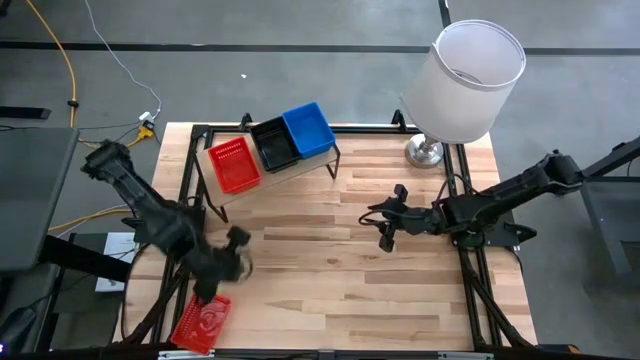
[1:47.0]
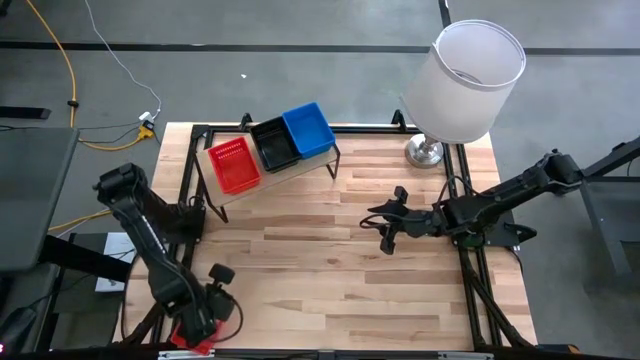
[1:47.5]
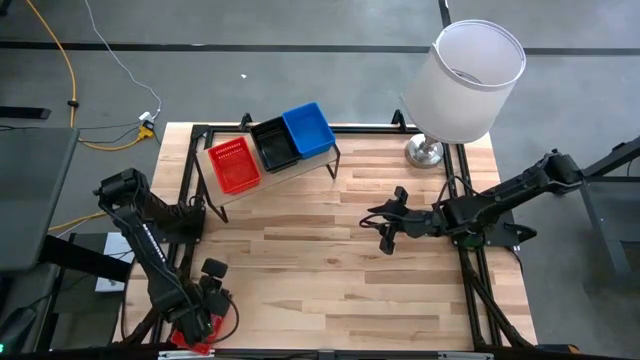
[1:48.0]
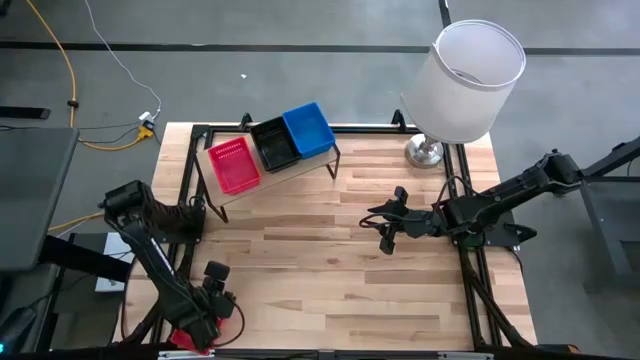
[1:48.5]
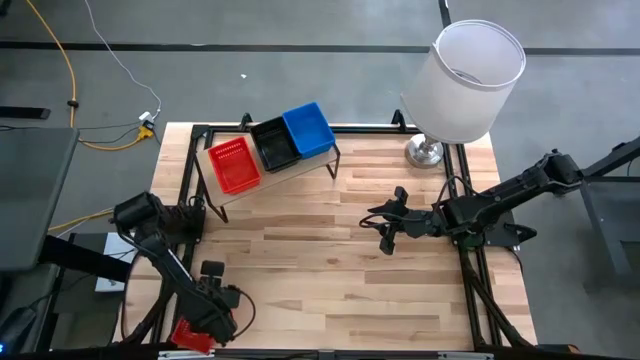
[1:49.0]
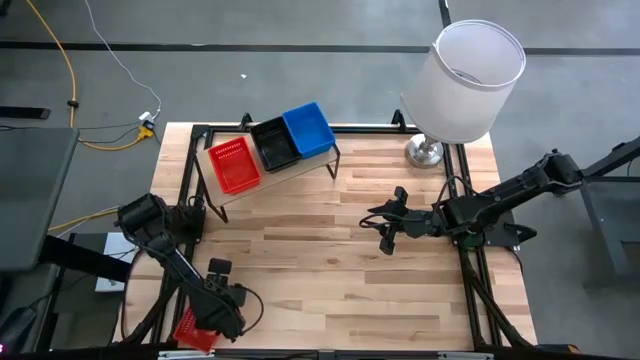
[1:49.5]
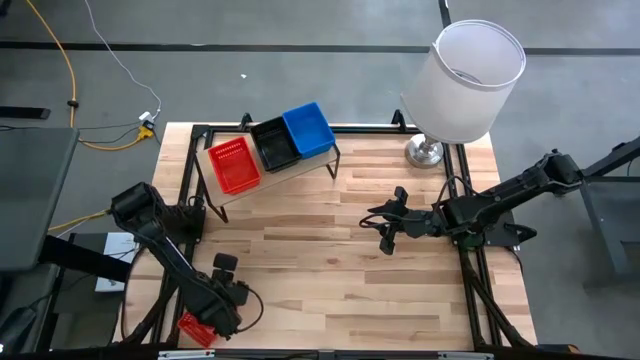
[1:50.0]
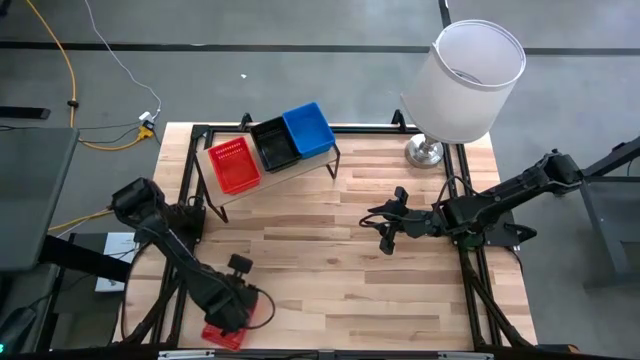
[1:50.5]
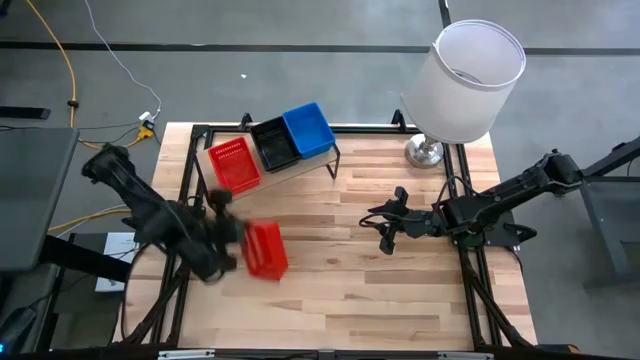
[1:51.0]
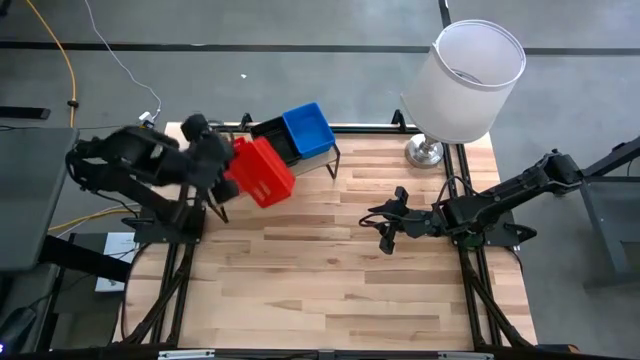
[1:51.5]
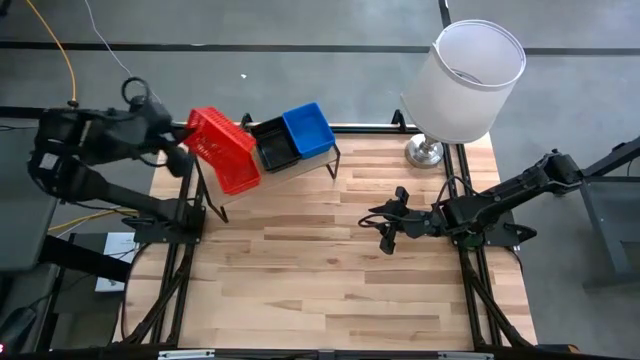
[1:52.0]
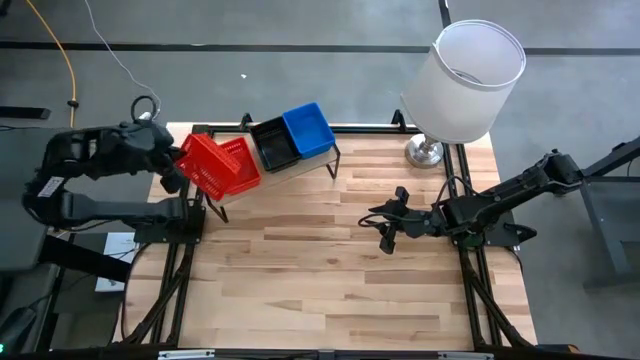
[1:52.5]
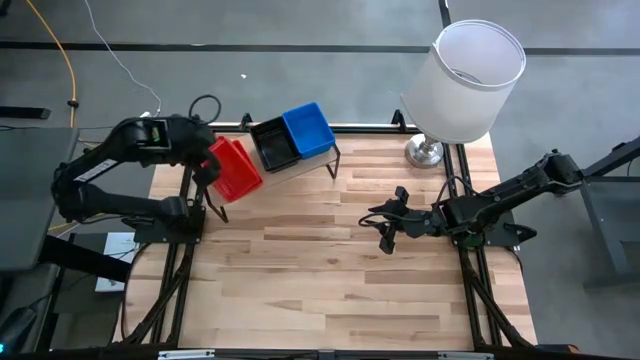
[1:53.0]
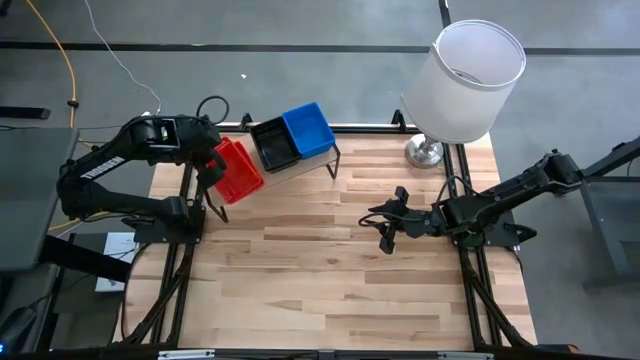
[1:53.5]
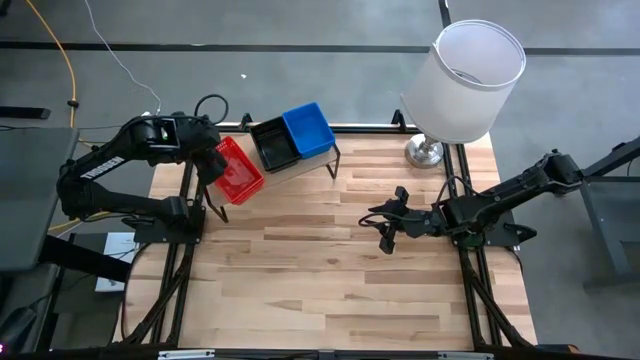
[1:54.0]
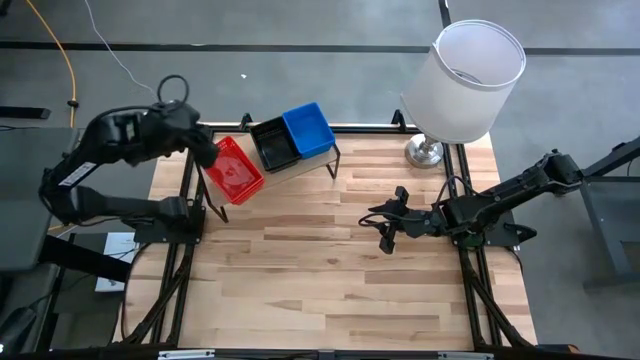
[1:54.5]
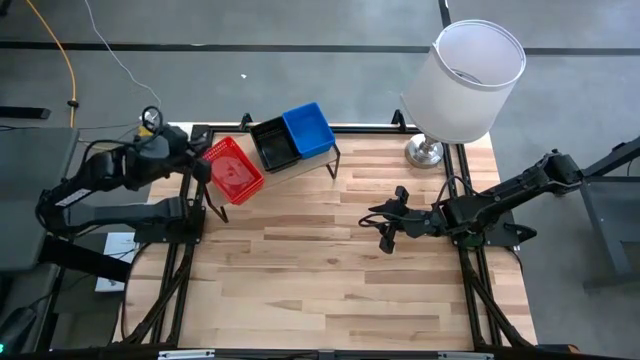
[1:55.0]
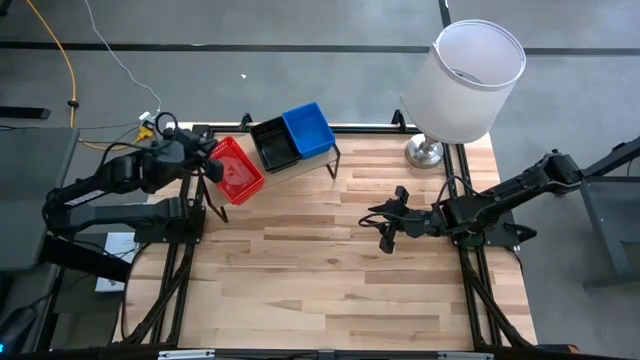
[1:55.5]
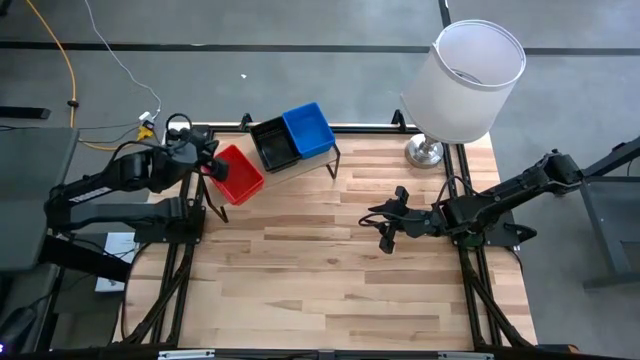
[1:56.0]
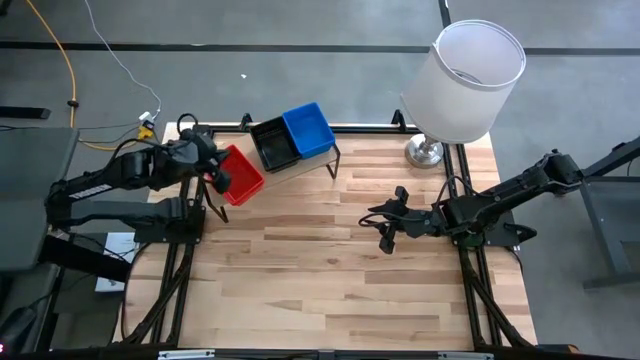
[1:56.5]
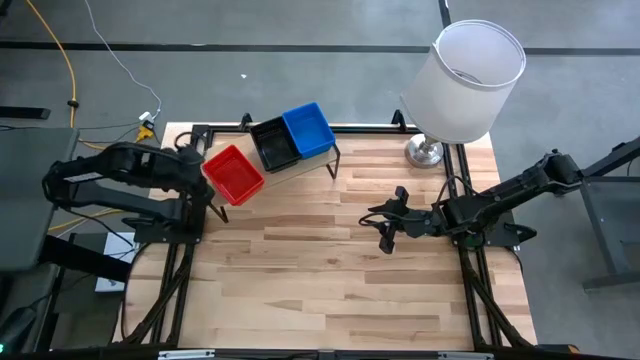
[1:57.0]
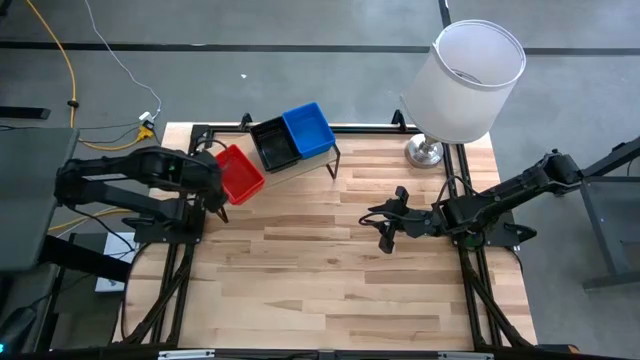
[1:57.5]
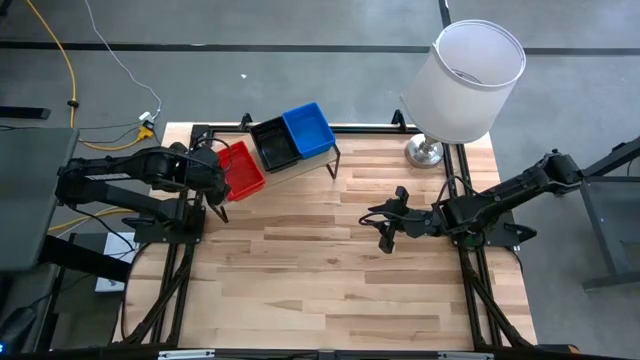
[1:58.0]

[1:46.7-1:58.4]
Task: Stack baskets on shelf by color
Stack the red bin on top of the other red bin on the shelf

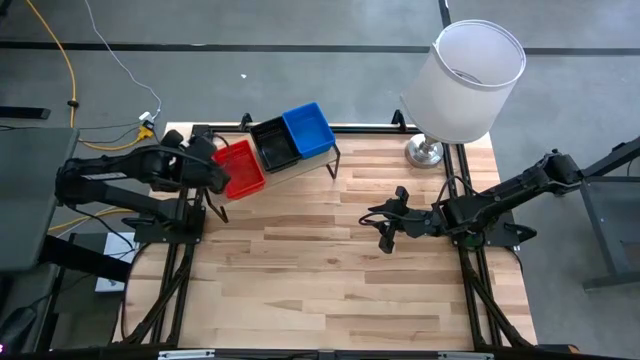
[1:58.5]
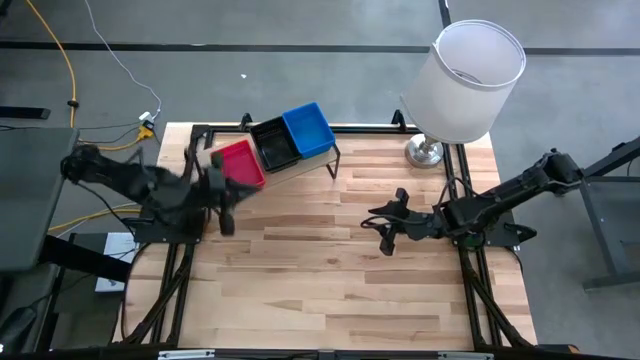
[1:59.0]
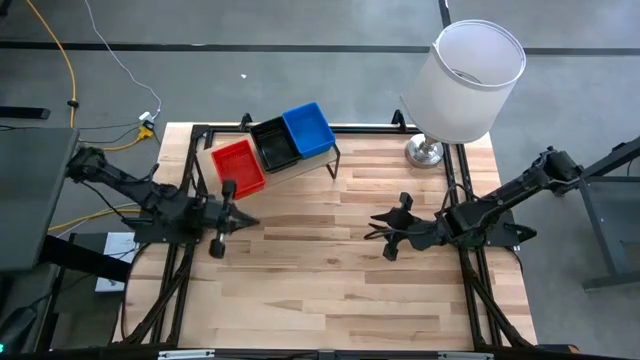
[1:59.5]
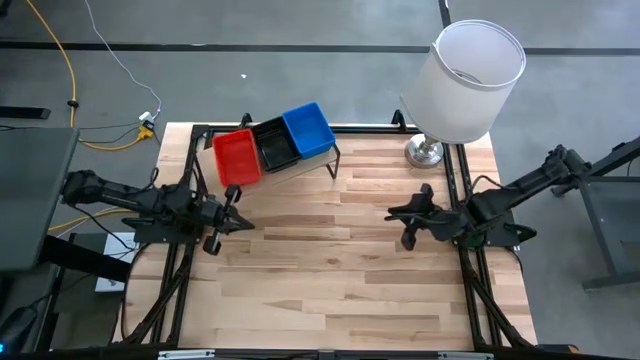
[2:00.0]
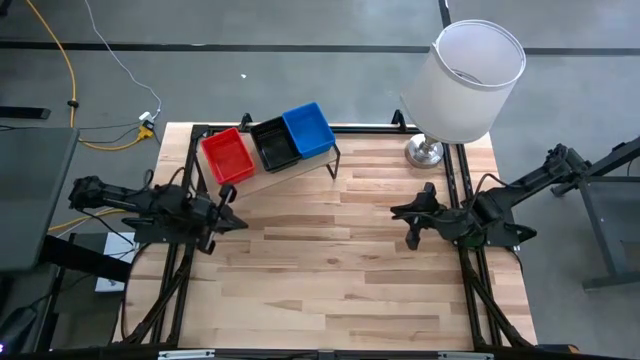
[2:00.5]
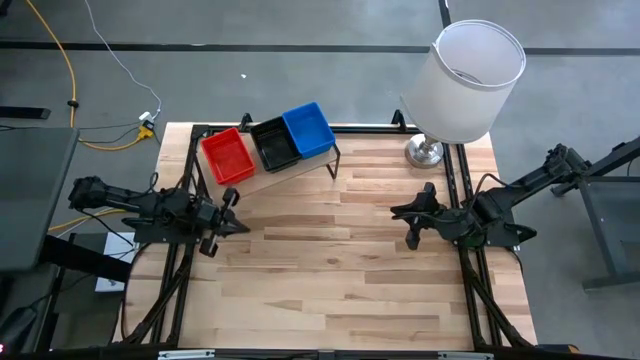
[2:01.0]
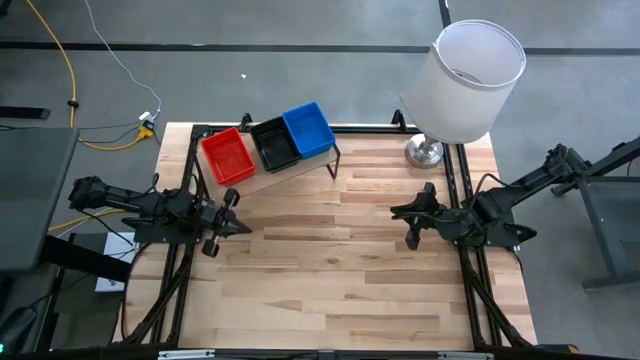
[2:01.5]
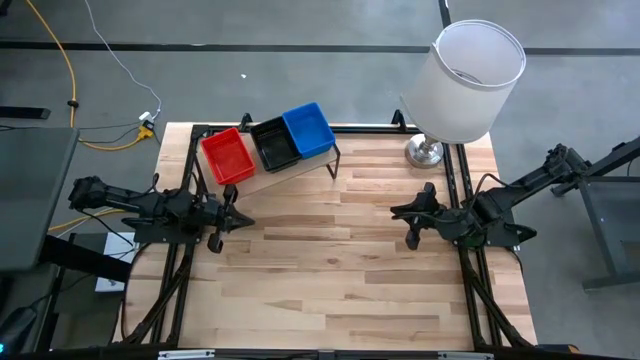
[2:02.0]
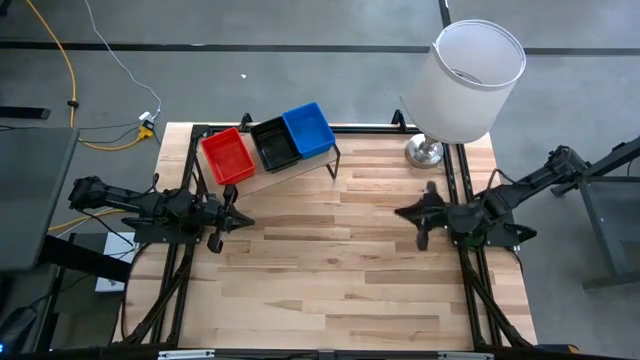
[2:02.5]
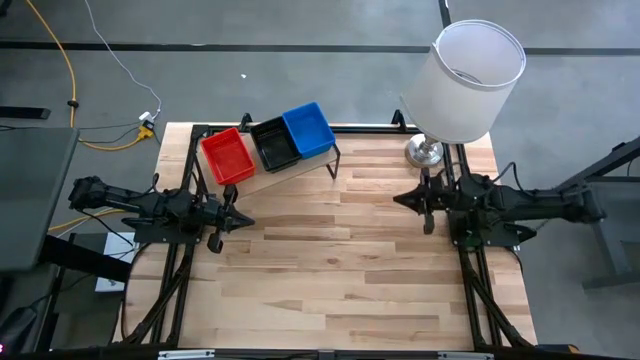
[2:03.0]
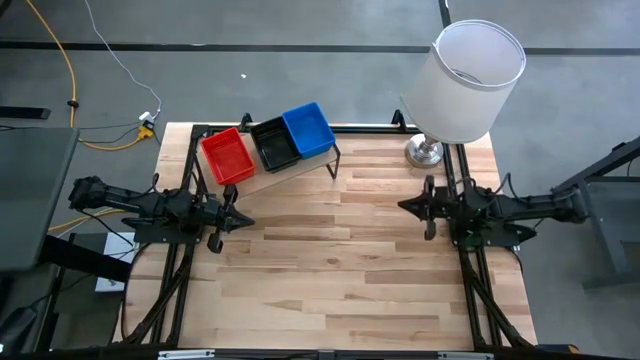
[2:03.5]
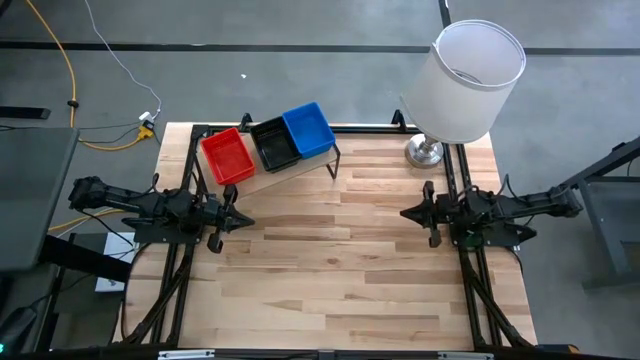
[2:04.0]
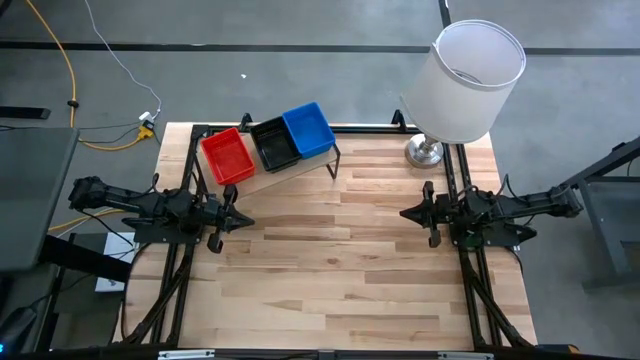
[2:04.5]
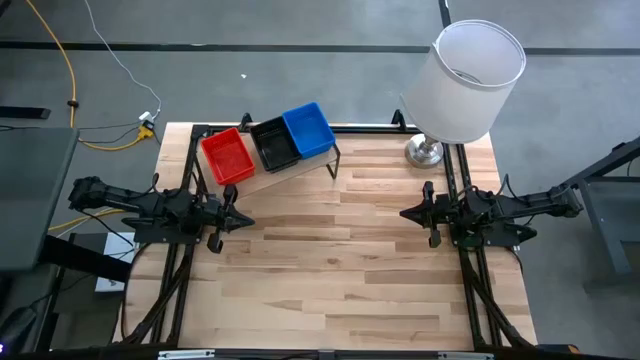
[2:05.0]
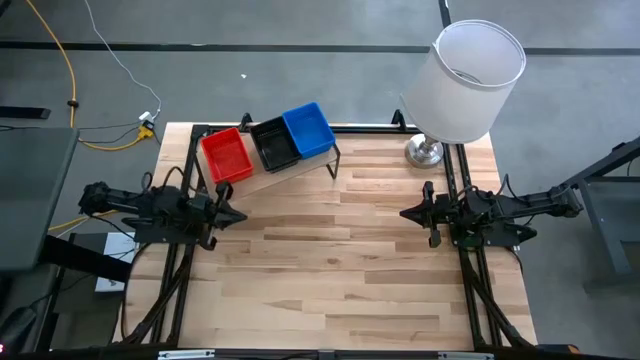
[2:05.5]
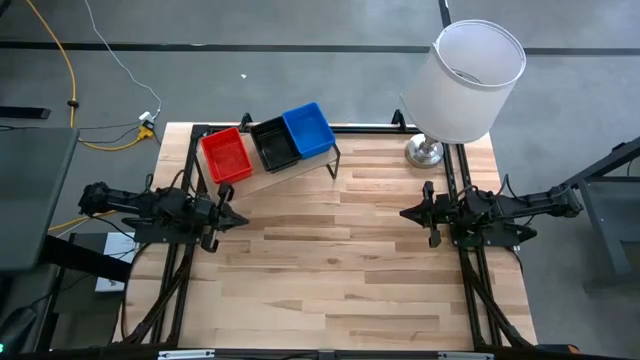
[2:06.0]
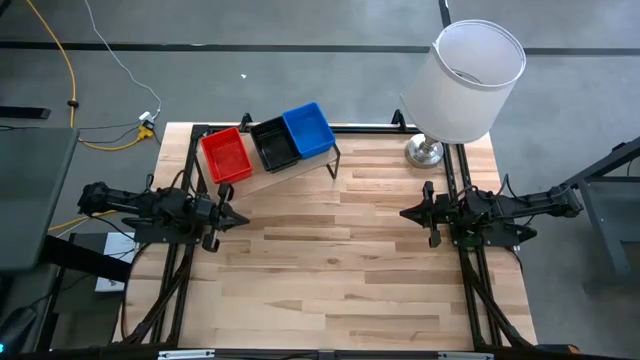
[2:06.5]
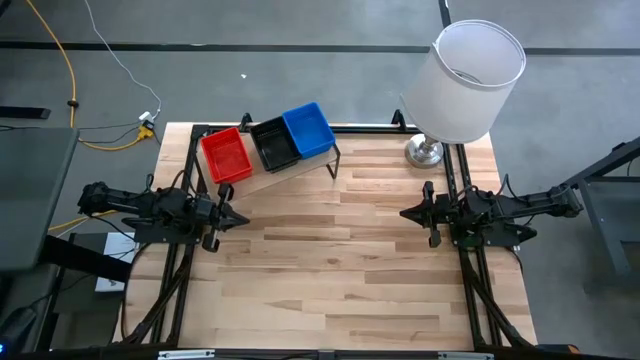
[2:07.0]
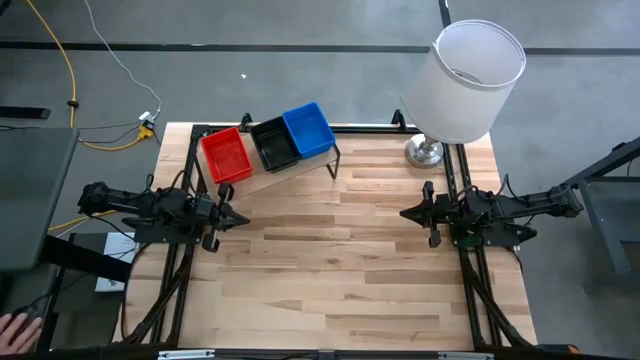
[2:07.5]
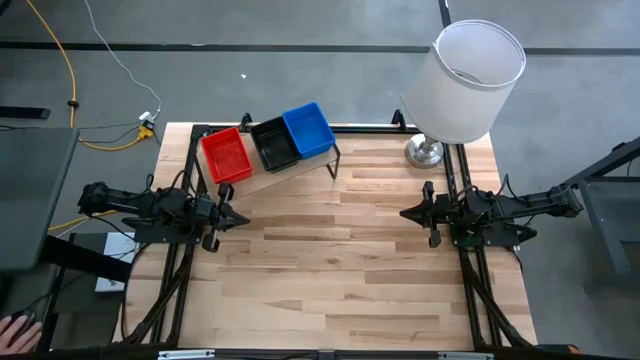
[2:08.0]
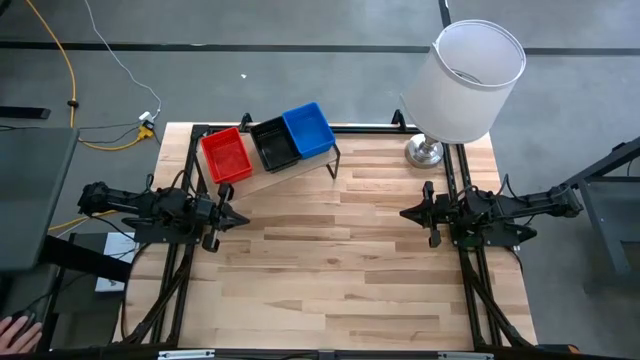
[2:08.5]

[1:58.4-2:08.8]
Return to Home Position
